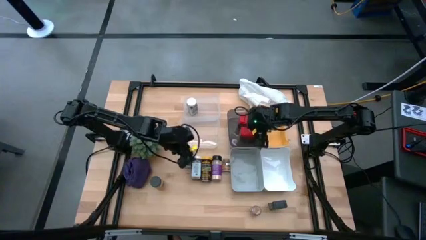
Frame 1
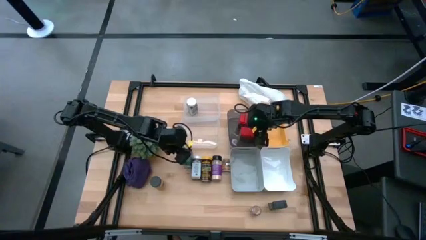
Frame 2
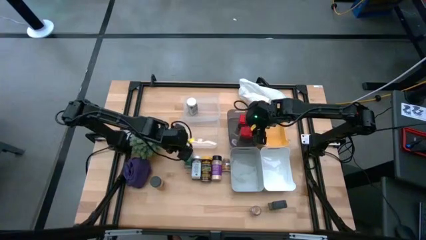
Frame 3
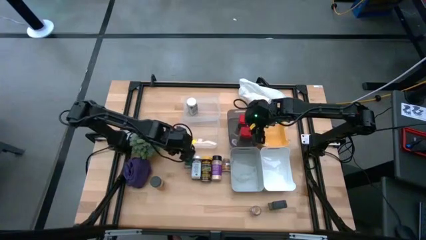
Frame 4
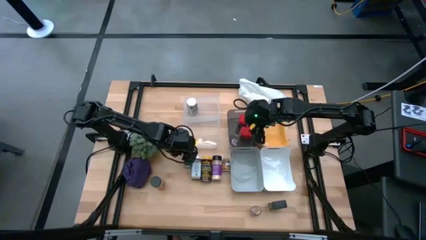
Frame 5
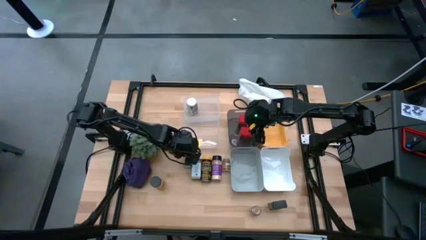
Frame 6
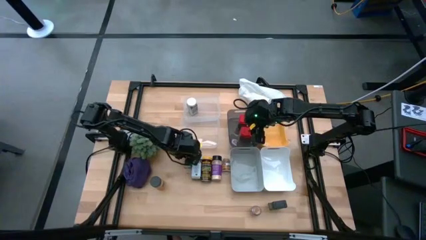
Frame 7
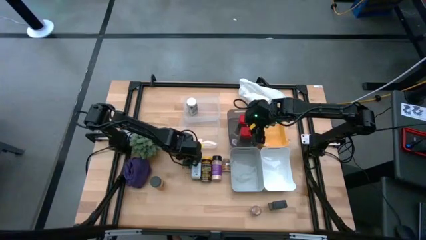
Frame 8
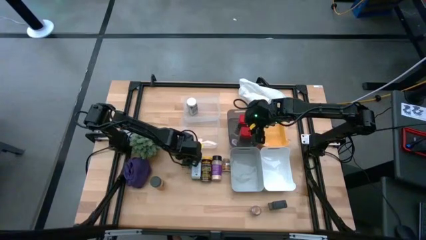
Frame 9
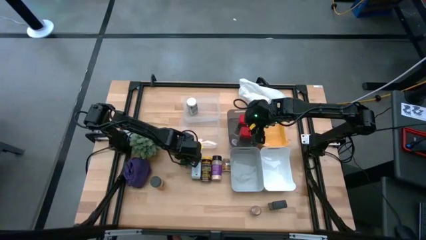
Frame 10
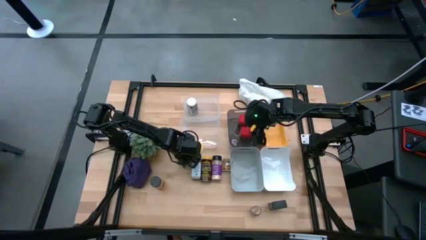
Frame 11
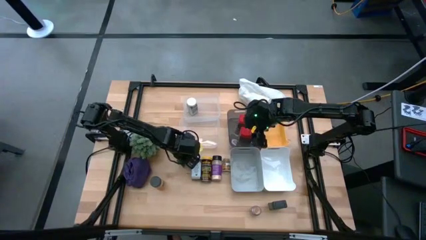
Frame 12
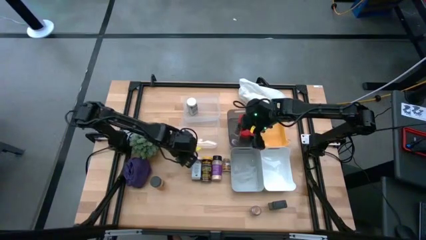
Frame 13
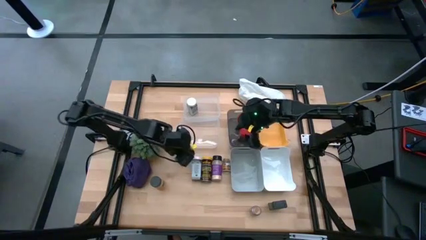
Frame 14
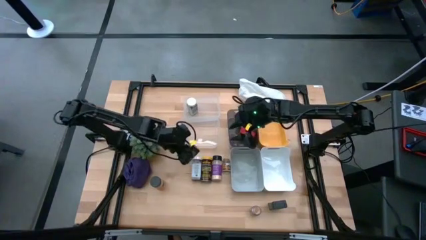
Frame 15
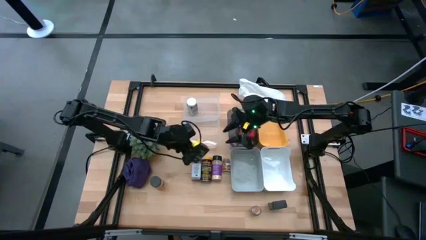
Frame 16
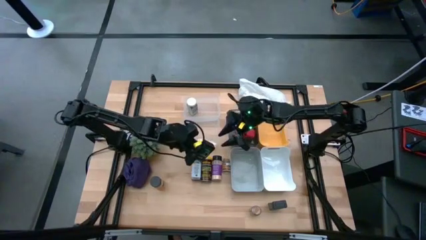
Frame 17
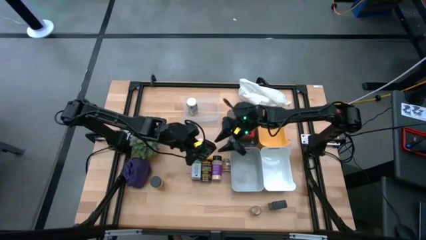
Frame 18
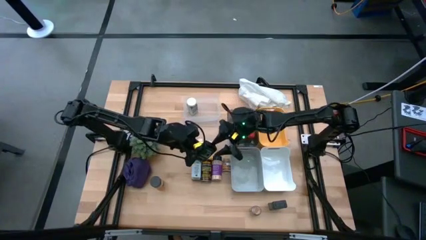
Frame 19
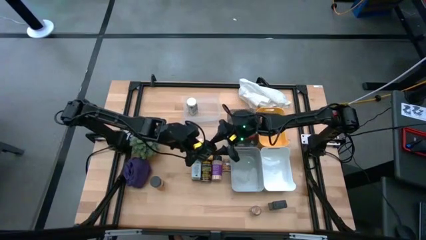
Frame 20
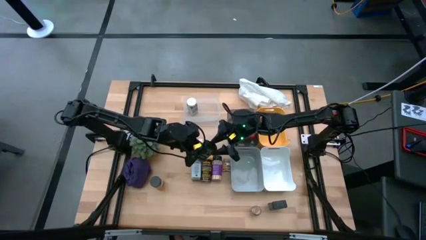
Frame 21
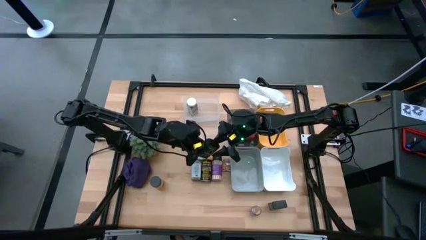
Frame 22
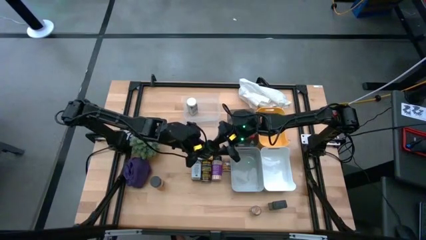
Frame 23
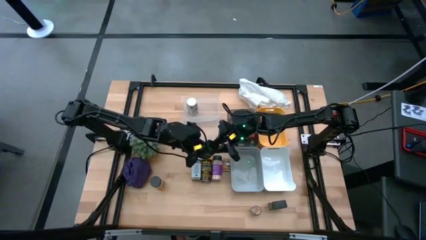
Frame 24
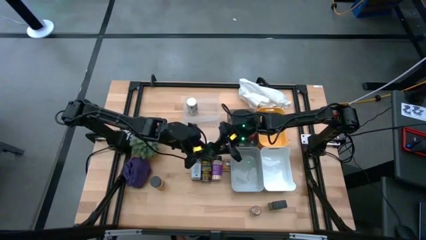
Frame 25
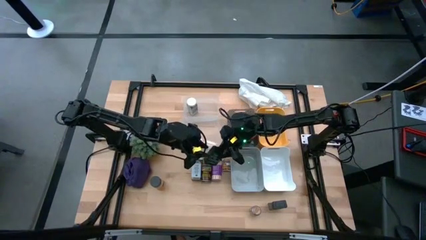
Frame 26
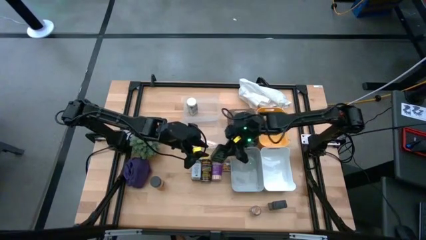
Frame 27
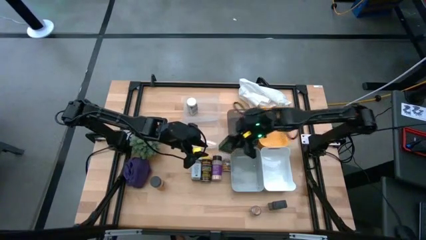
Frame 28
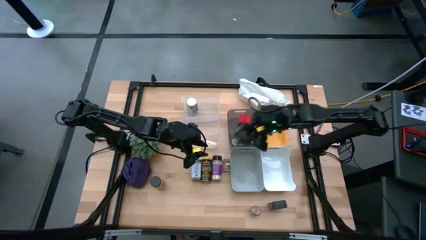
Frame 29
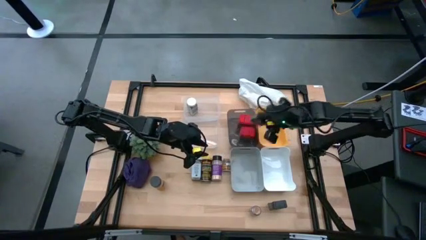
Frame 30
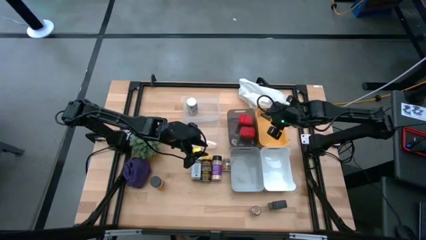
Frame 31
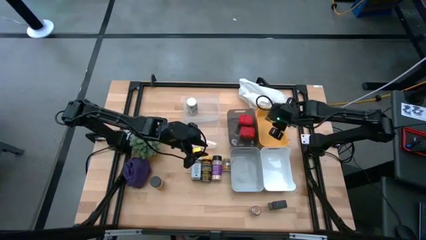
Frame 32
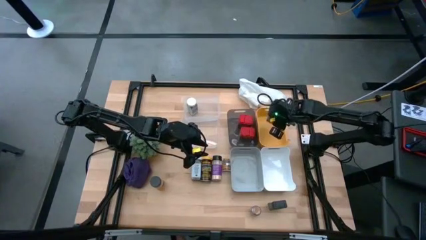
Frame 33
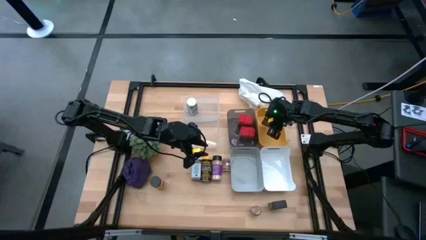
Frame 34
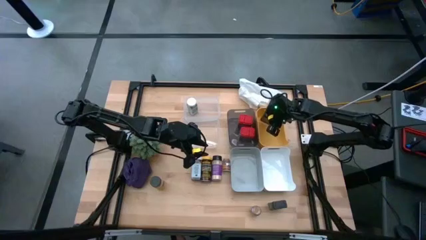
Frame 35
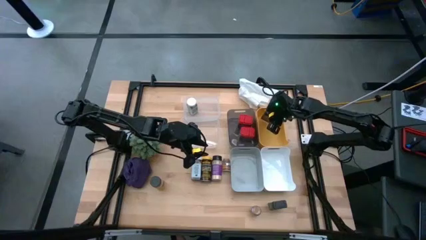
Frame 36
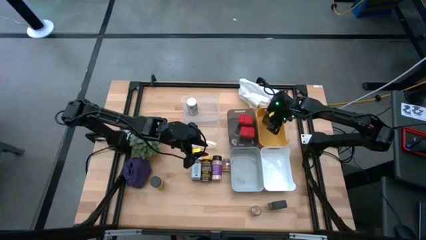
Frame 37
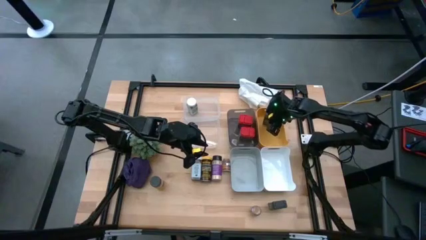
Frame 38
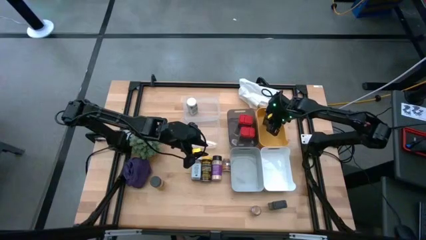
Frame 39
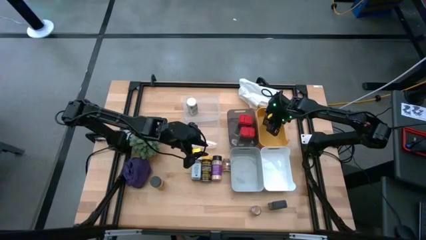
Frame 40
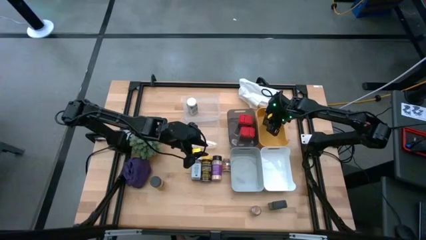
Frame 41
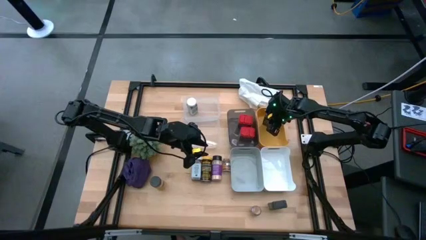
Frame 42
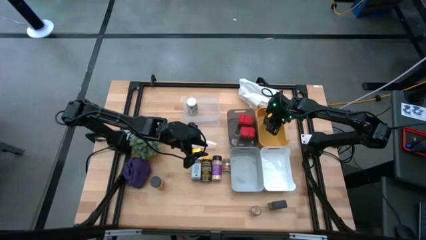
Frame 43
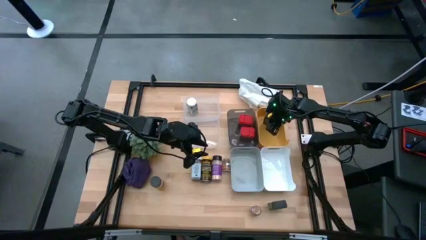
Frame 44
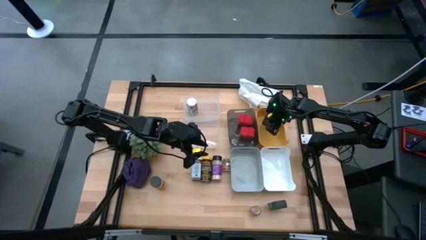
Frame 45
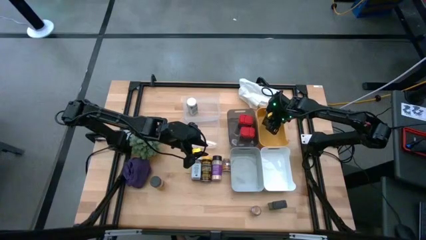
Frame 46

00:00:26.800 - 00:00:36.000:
Task: Sort spices by type
Put the top black seasoning can into the yellow bin

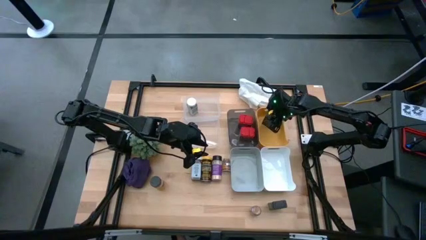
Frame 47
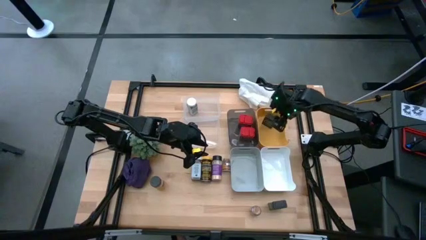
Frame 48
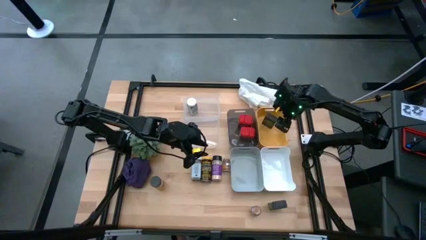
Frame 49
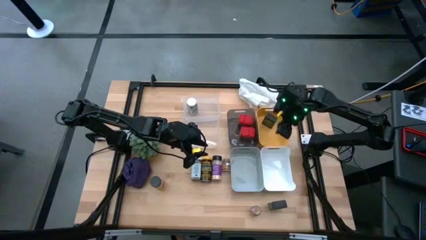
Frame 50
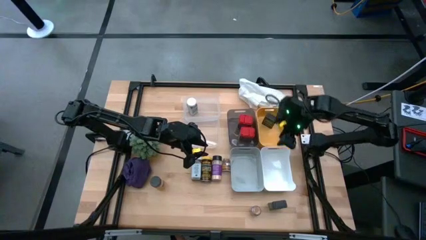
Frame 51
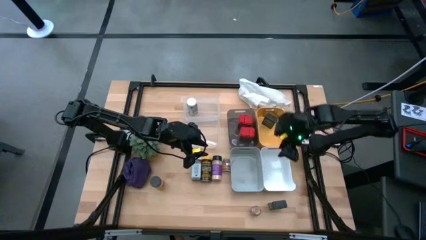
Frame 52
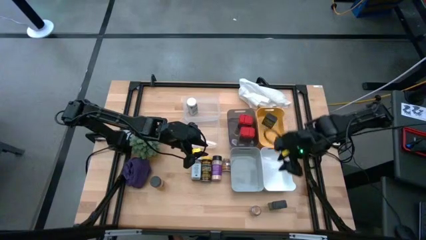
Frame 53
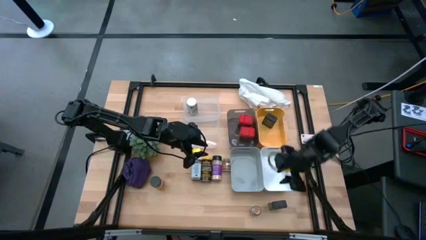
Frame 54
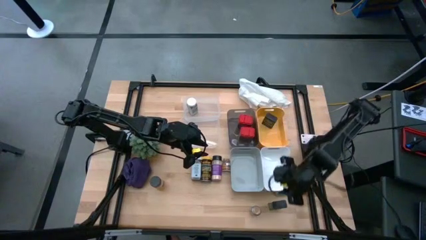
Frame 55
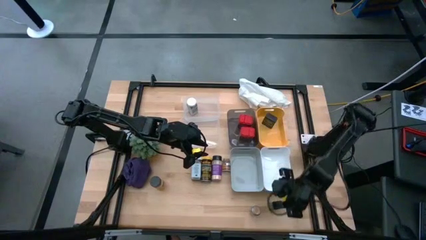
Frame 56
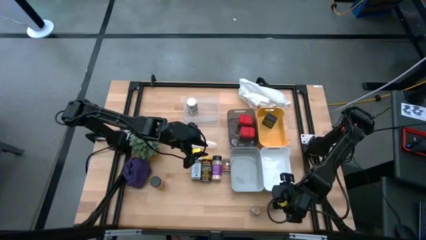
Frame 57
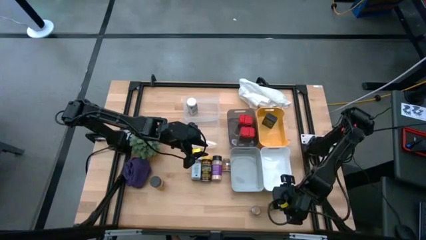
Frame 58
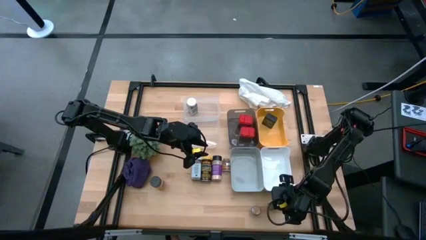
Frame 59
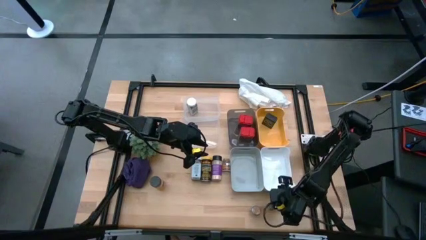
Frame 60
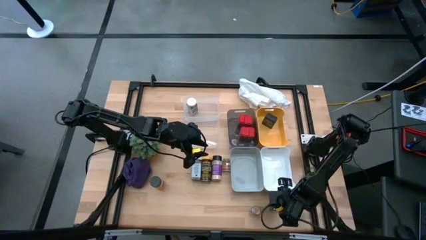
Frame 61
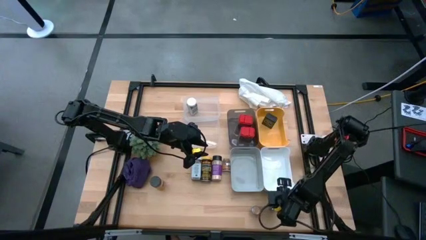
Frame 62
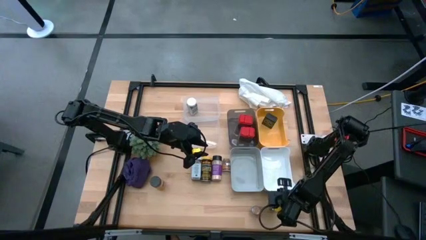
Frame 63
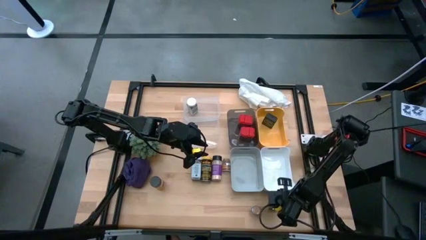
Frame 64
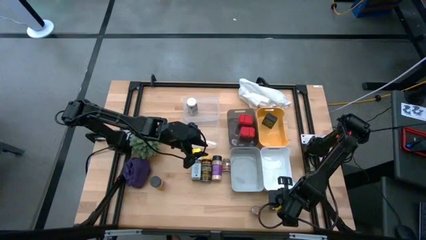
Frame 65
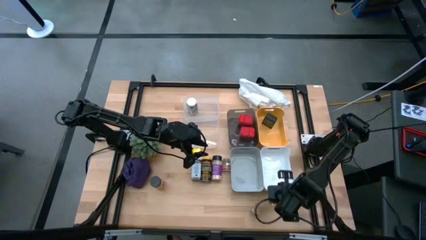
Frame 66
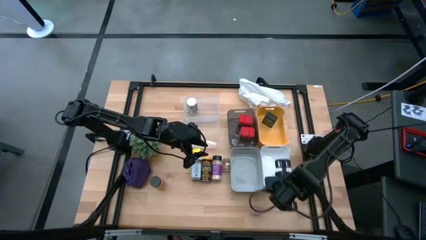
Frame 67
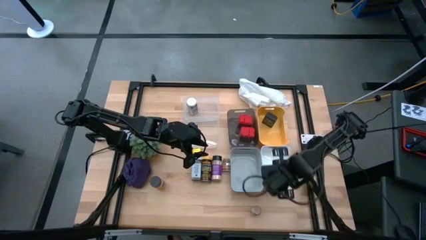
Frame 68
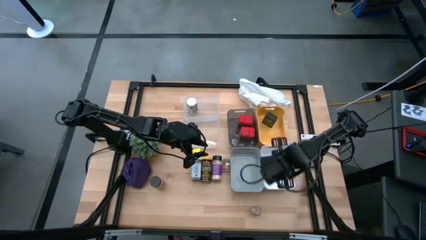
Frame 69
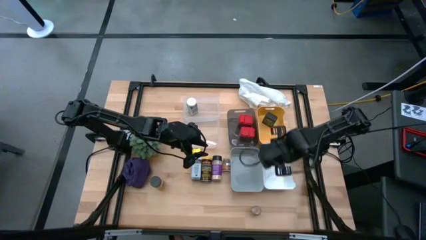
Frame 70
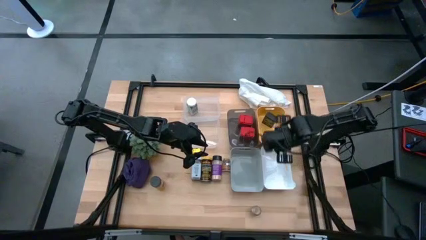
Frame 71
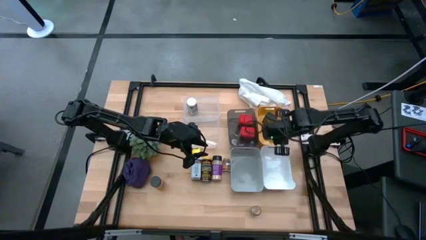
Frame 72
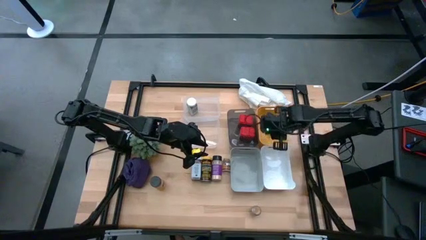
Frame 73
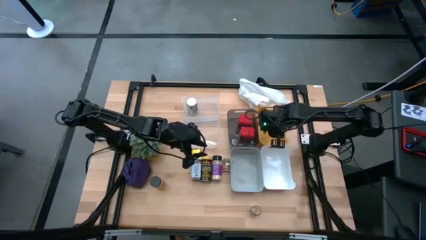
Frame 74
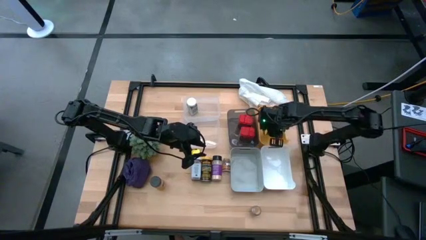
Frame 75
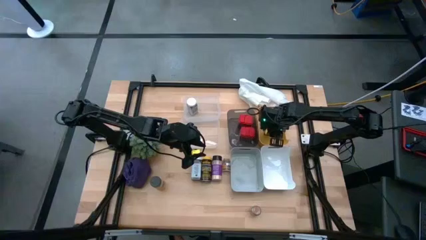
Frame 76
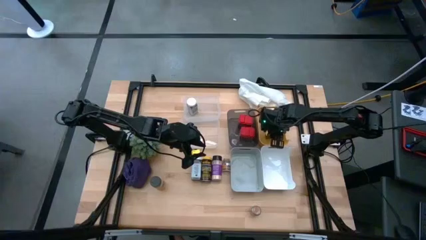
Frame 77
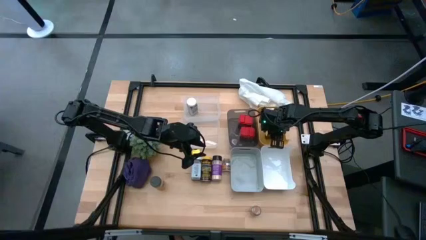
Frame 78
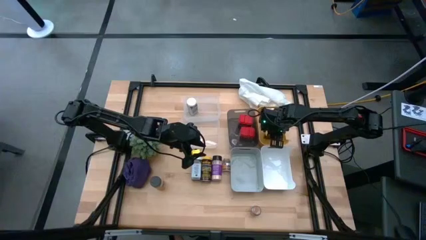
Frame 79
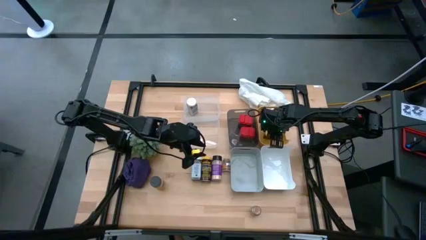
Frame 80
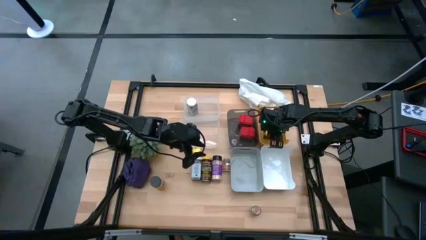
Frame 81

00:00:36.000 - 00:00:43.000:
Put the black seasoning can into the yellow bin

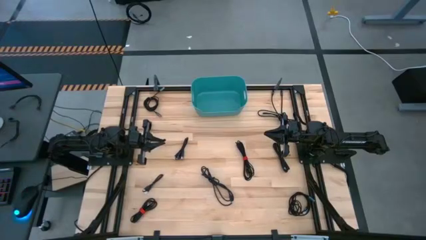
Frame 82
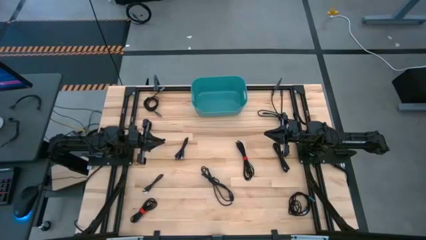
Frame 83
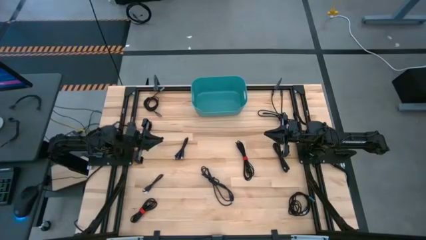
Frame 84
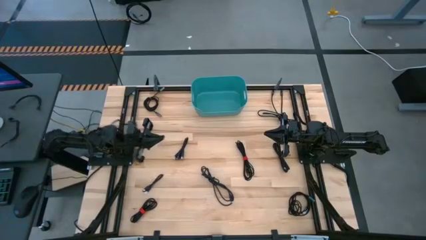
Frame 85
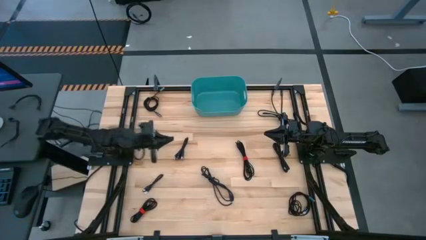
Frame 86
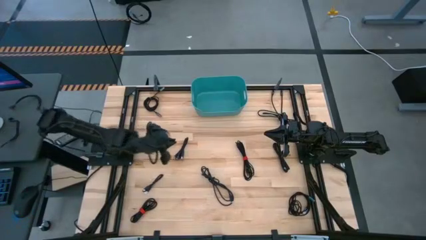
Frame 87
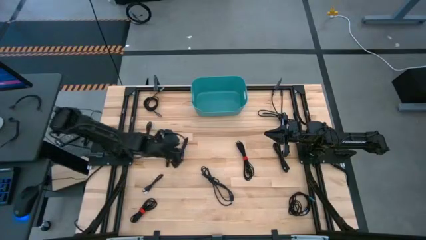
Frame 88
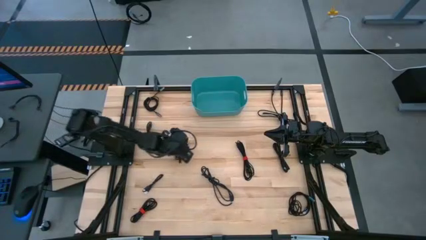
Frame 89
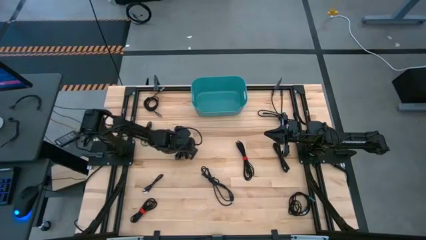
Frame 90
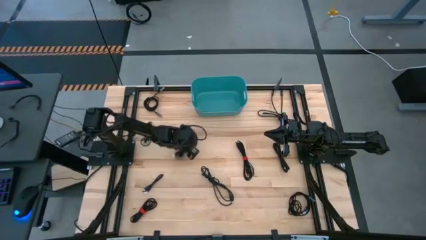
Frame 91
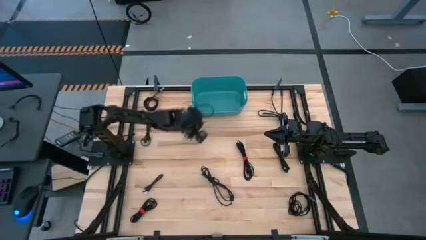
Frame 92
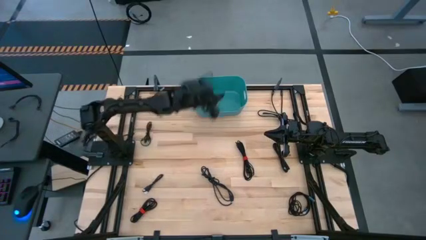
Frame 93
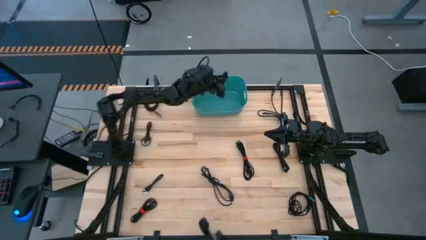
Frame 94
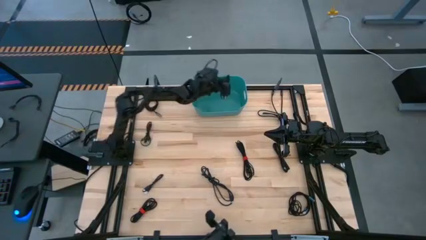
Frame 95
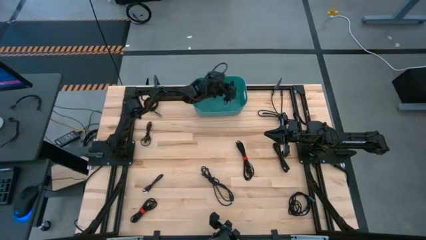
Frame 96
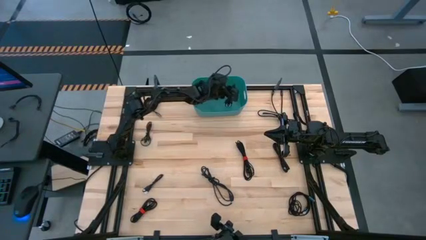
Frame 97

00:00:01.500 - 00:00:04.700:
Task: Pick and place USB-C Cables
Put the black charger cable into the blue bin
